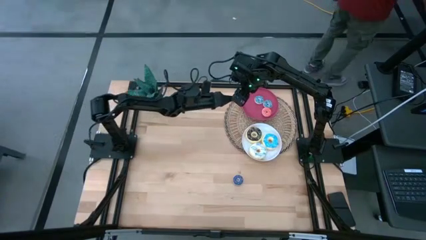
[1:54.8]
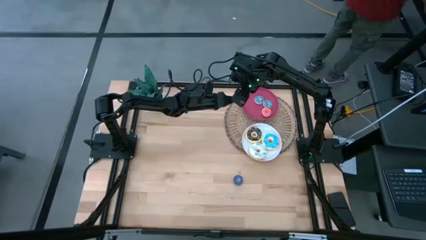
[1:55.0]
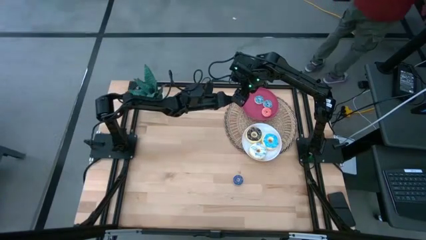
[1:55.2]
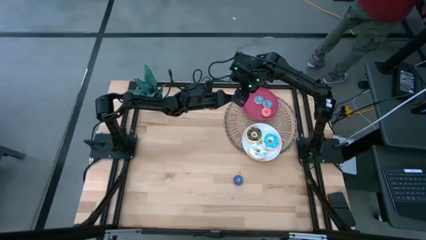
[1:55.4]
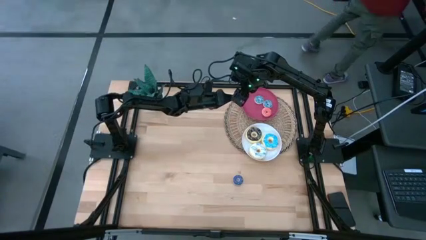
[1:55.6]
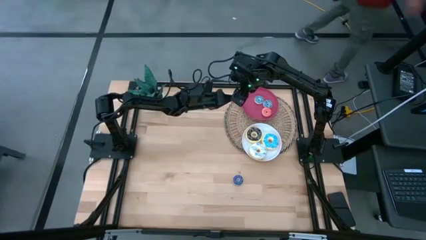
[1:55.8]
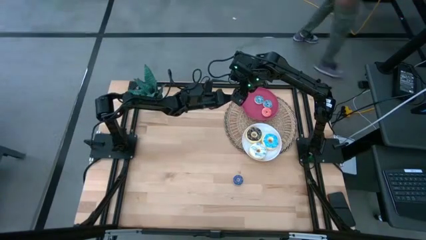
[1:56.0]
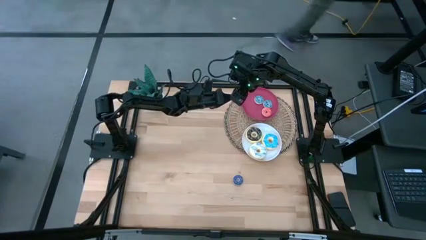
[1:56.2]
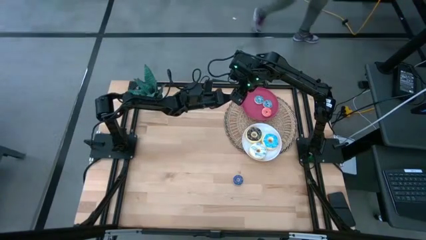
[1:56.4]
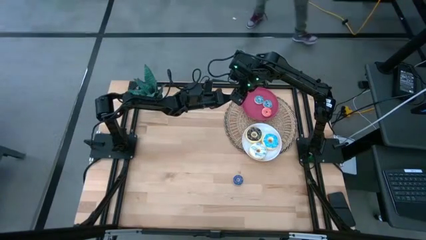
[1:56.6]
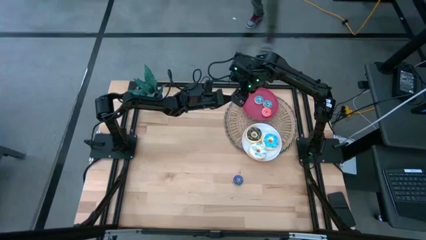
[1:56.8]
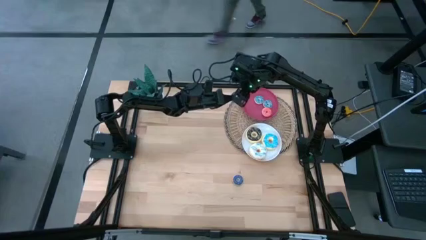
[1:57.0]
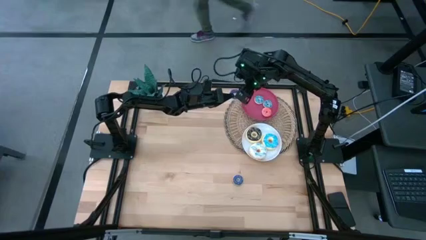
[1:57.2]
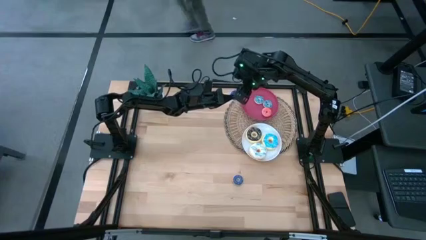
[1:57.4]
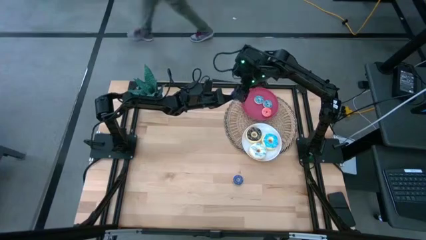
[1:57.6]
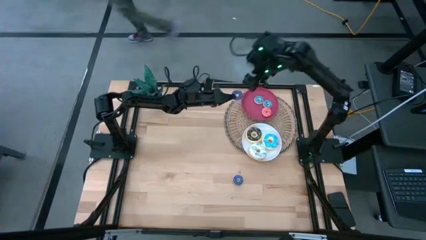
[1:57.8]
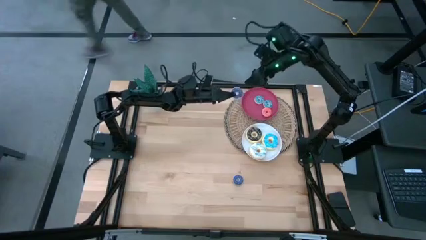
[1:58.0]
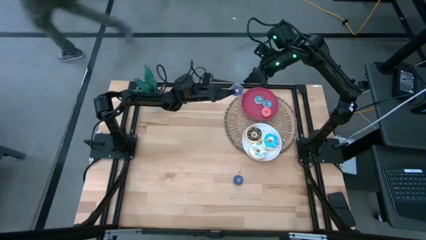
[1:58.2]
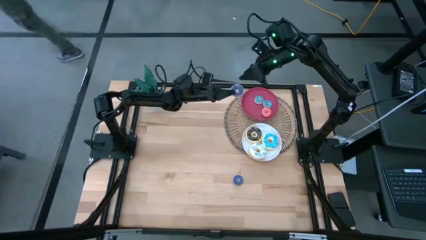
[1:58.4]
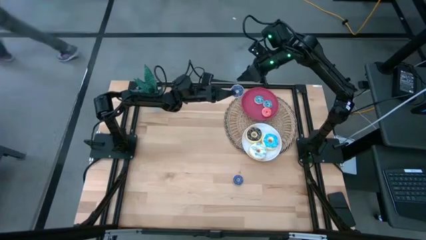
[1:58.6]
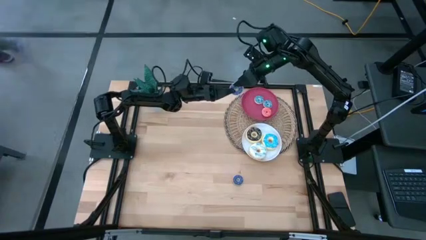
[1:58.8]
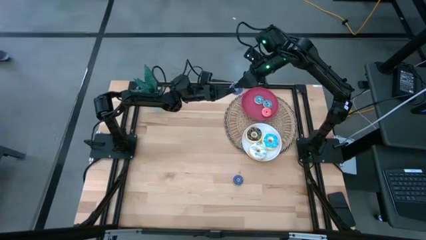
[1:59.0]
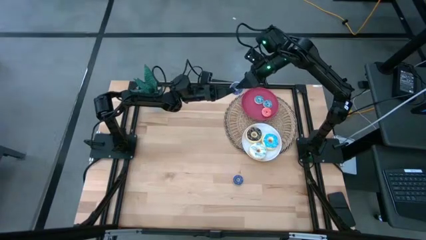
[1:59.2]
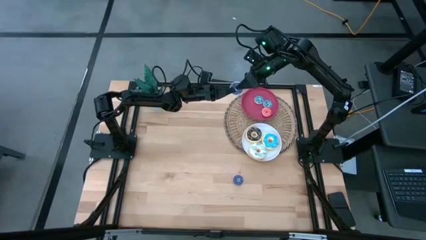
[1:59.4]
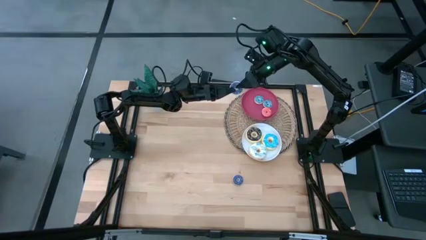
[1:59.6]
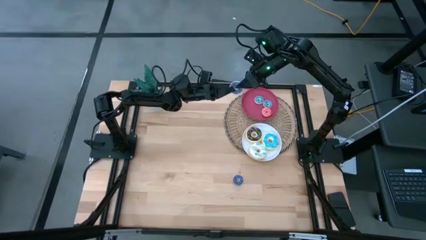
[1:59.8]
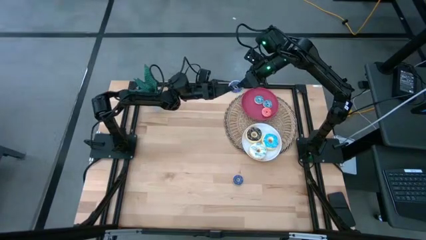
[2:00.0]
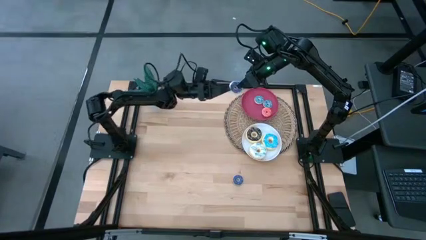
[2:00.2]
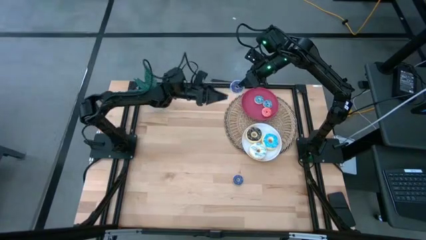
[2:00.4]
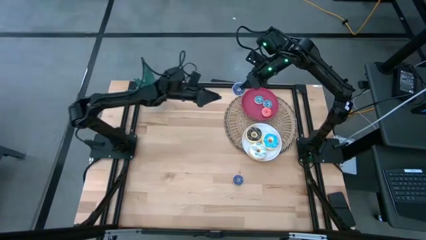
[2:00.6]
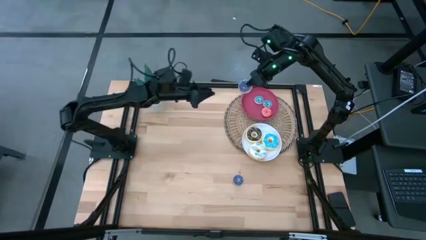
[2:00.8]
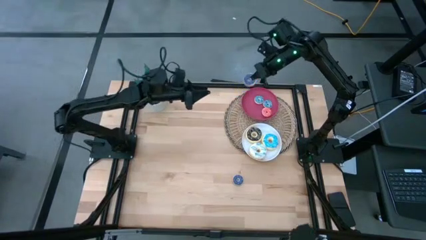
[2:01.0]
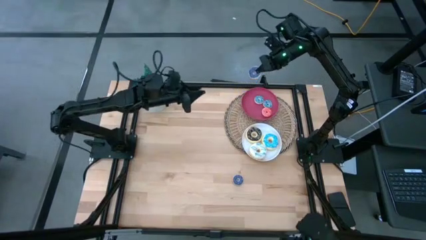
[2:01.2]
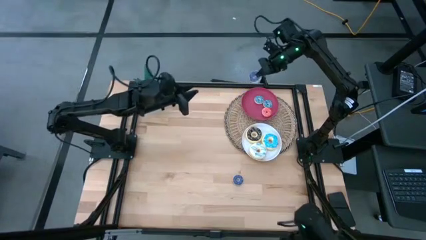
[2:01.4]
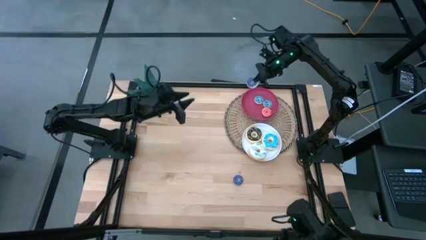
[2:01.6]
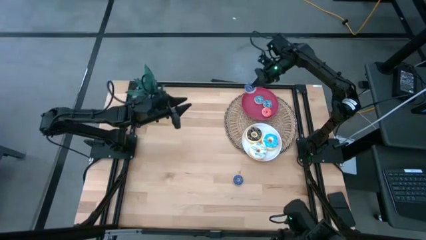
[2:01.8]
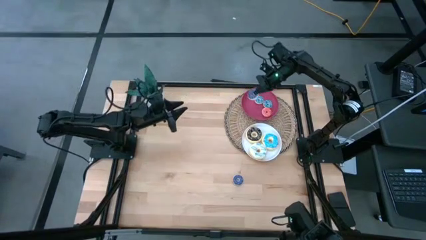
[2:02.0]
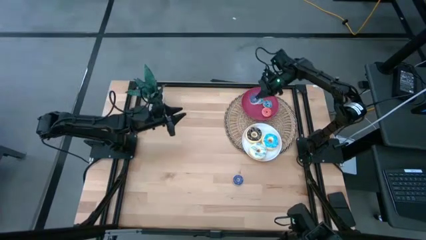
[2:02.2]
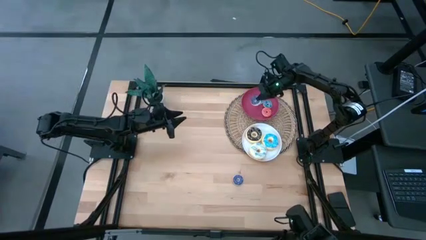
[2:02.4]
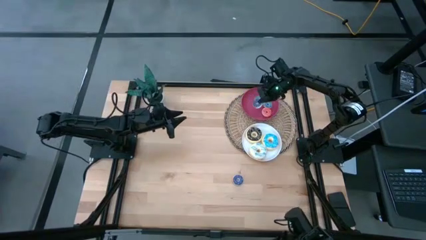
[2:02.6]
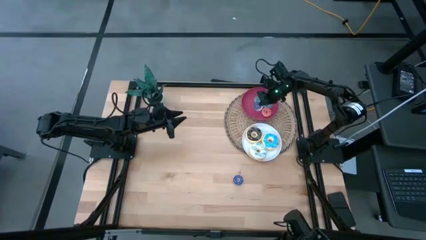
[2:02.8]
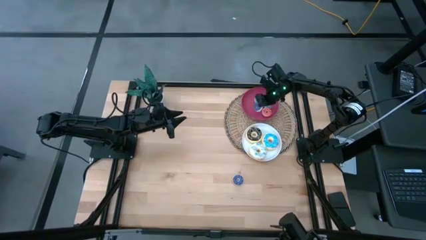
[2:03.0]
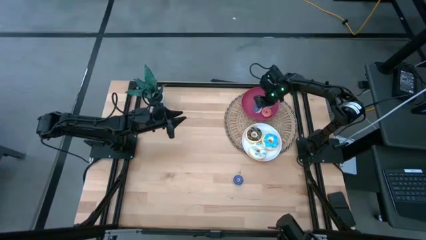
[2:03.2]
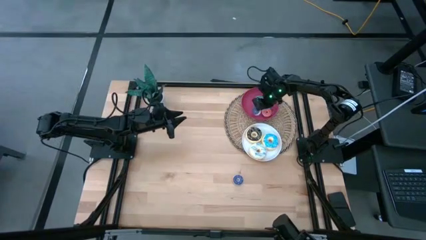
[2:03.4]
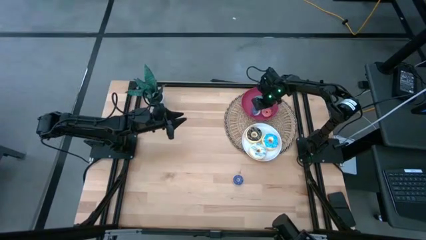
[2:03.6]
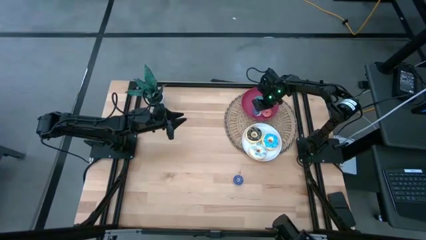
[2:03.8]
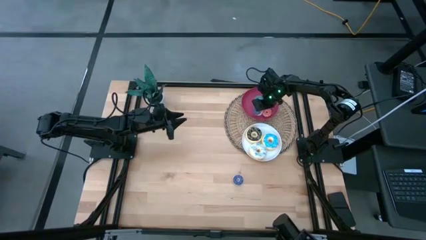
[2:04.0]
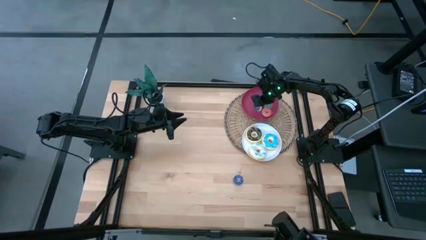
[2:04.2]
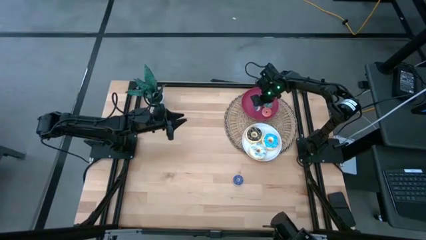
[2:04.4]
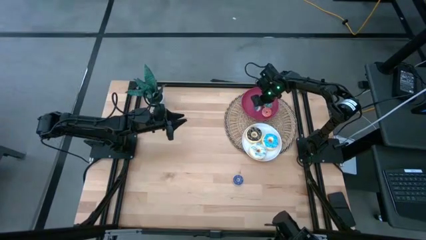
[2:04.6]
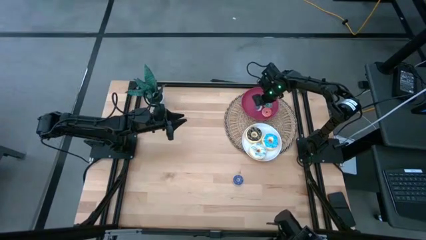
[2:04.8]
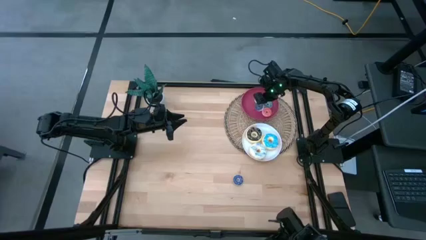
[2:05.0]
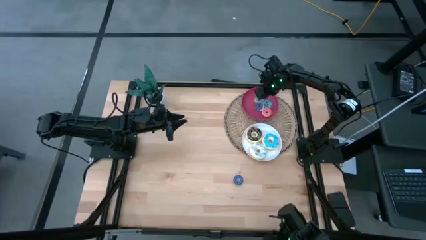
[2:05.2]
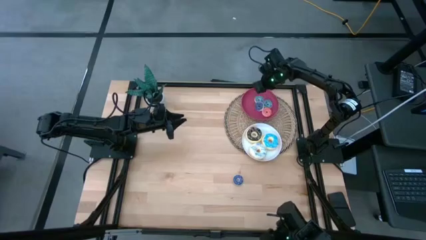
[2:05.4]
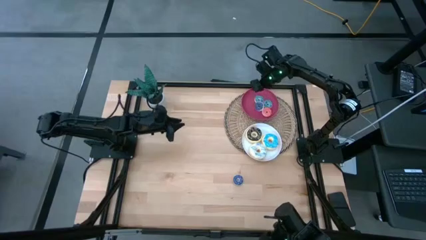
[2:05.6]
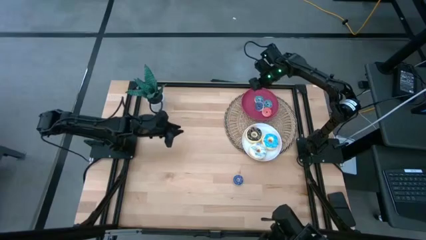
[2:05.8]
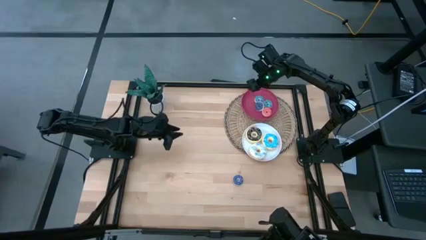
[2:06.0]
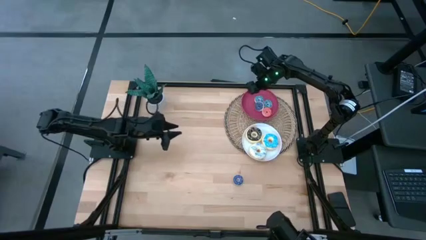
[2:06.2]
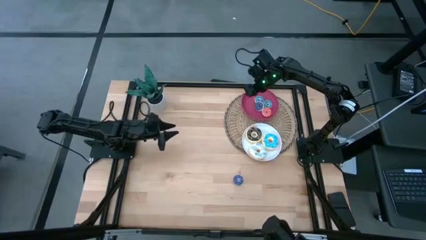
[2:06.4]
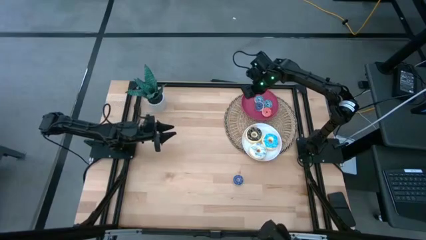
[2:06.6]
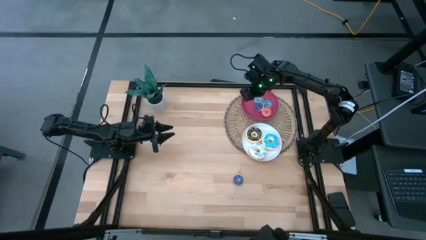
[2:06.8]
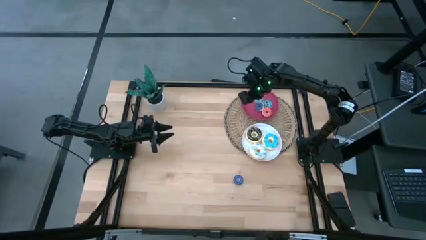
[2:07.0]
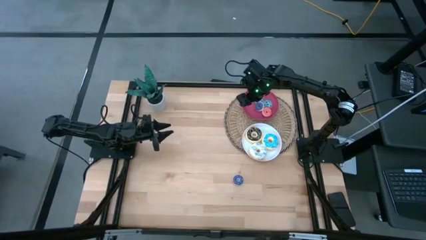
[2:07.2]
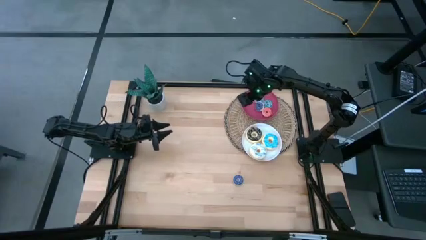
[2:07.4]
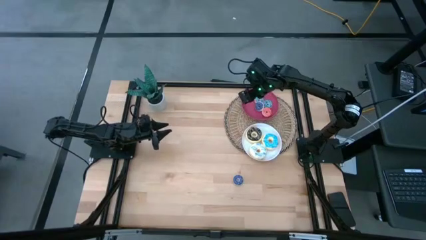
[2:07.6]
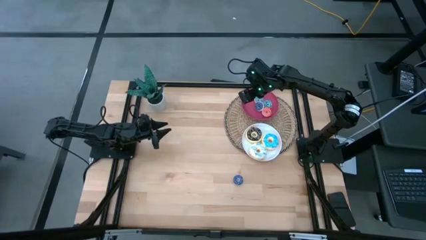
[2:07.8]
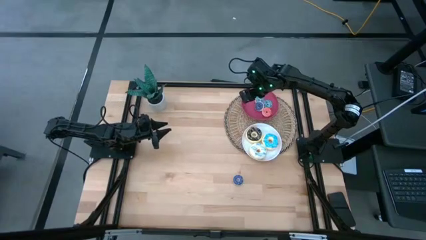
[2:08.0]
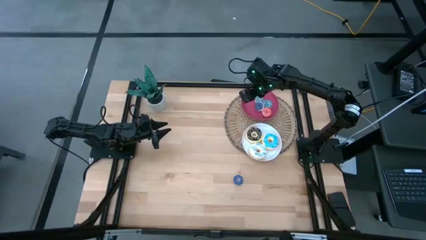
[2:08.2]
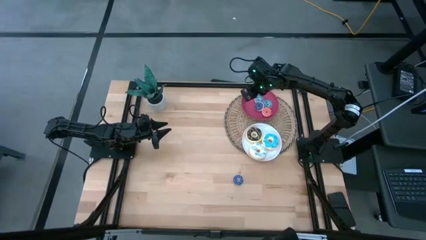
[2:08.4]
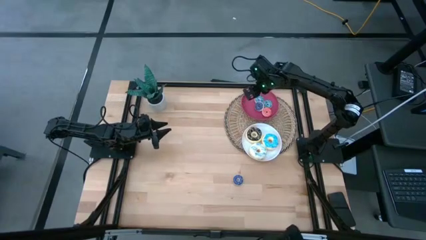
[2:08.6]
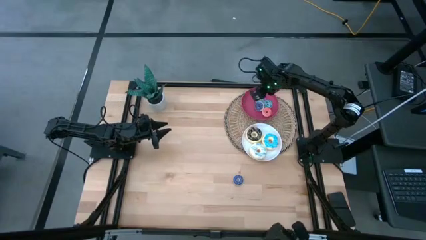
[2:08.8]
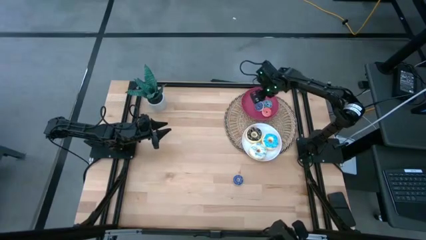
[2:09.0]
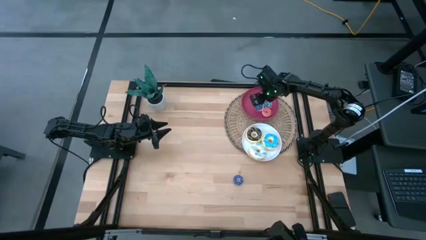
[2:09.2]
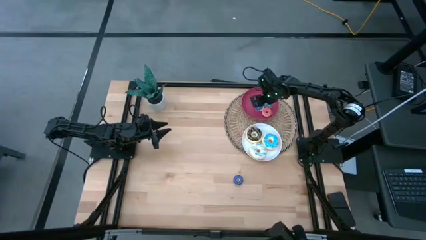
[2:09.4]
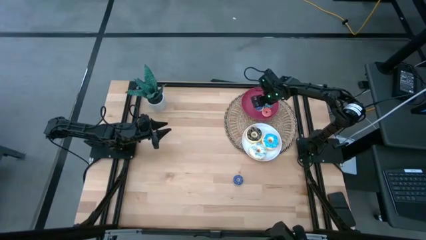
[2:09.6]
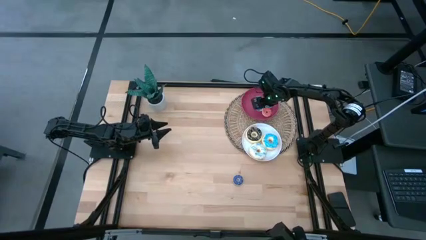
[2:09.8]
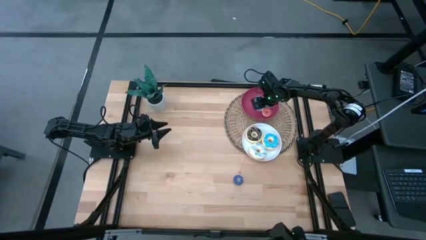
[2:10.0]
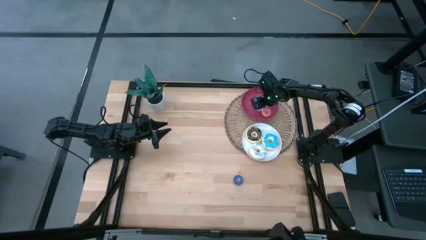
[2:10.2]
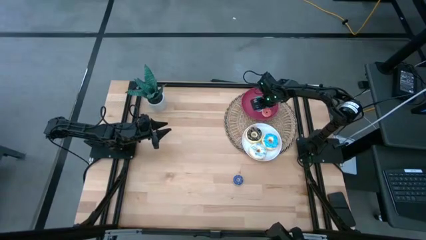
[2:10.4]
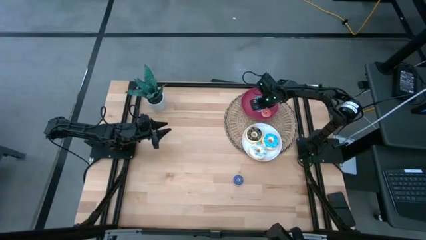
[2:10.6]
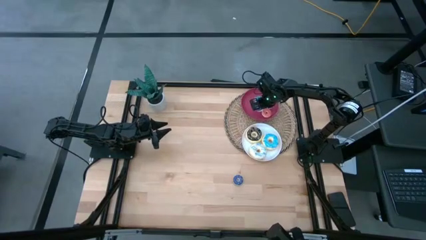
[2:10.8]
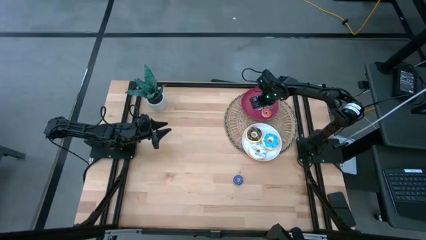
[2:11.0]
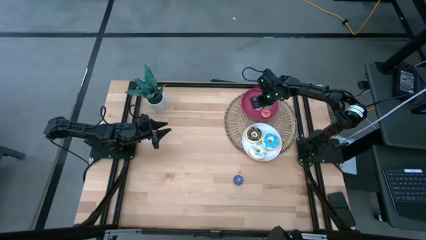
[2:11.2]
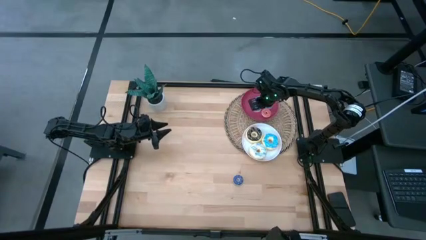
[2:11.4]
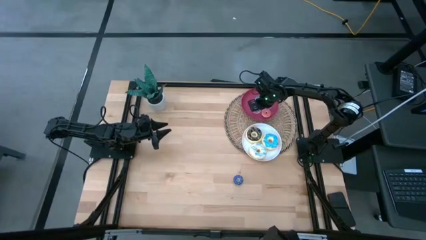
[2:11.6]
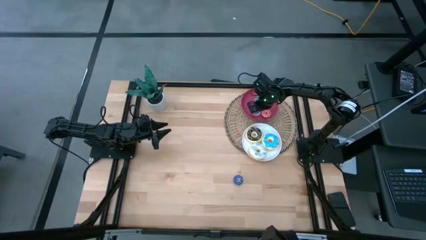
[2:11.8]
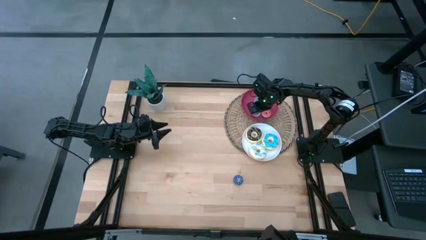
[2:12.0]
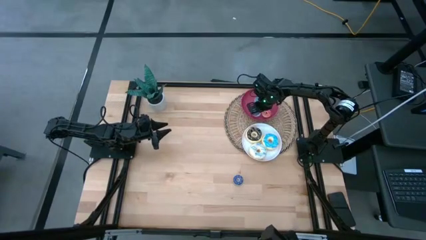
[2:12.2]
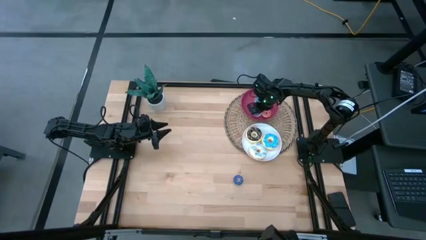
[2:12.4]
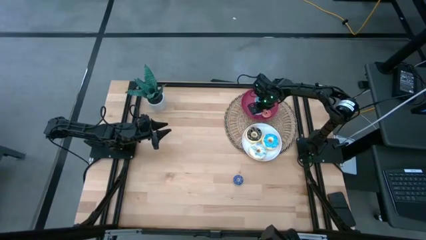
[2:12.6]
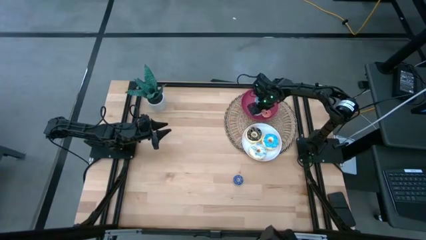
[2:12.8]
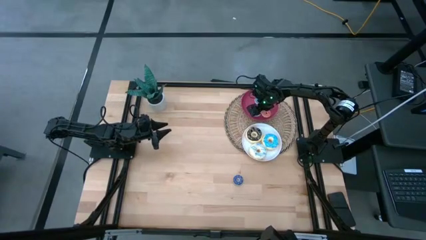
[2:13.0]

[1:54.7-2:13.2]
Task: Pick & Place donuts
Put the right small dark blue donut on the red plate
